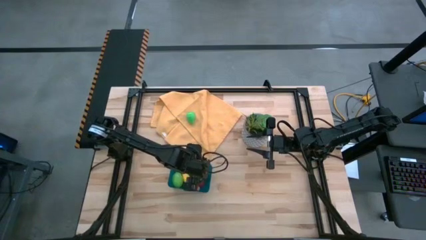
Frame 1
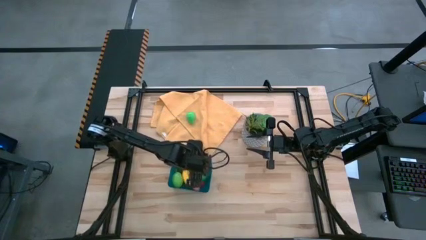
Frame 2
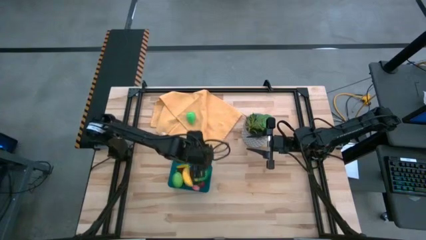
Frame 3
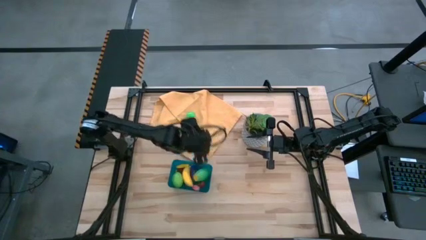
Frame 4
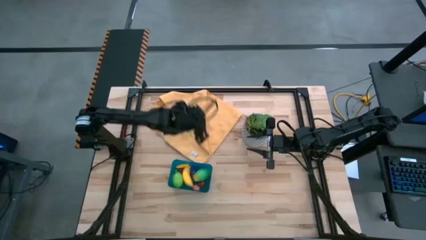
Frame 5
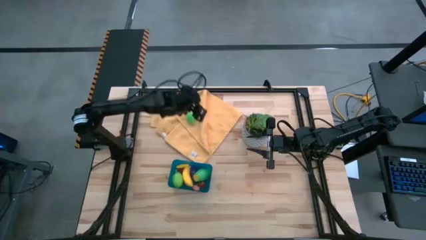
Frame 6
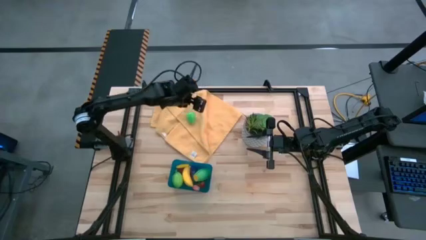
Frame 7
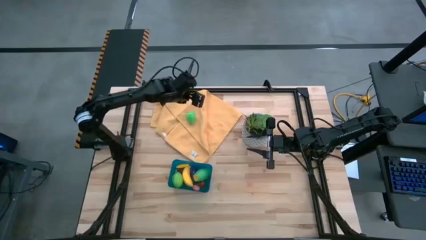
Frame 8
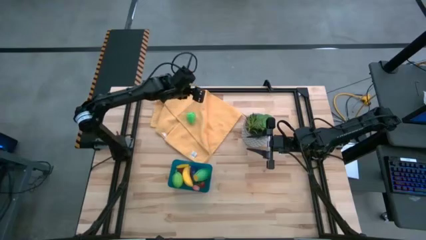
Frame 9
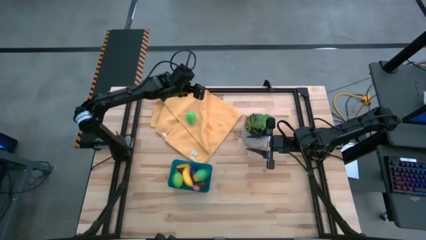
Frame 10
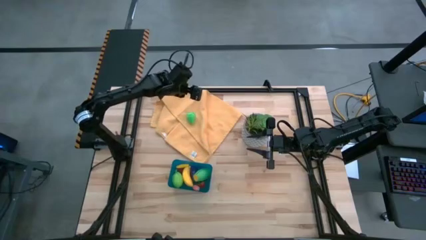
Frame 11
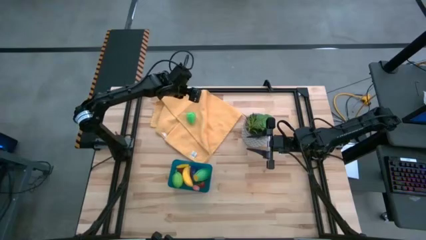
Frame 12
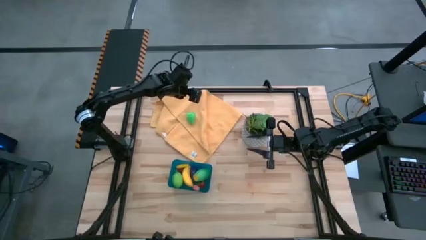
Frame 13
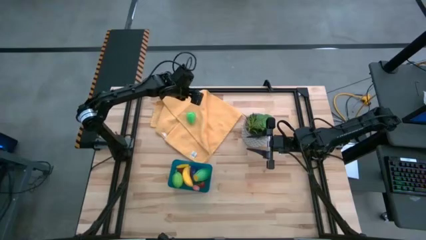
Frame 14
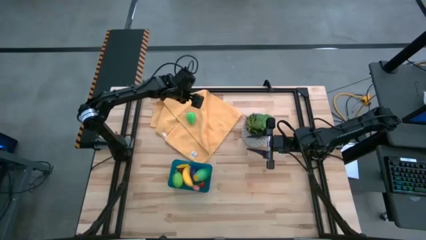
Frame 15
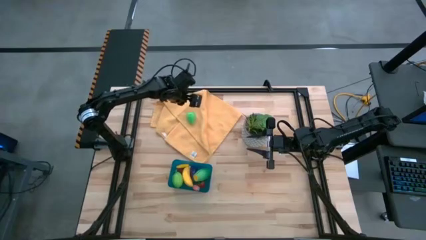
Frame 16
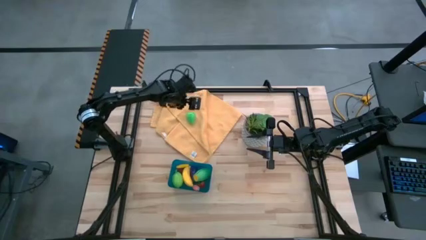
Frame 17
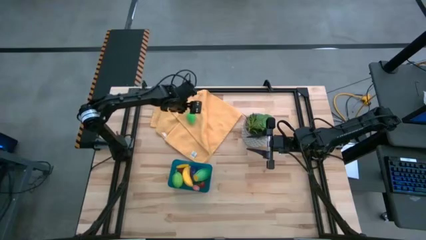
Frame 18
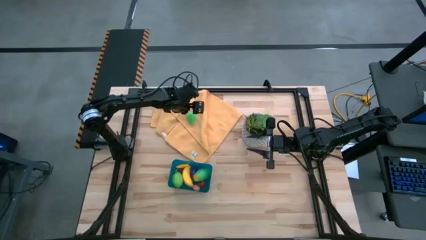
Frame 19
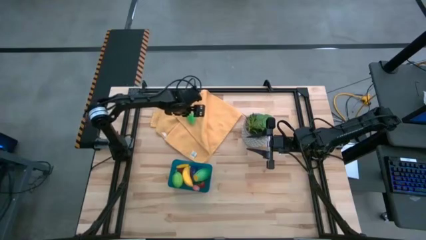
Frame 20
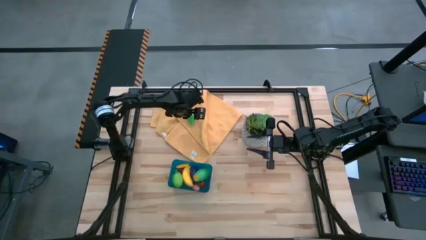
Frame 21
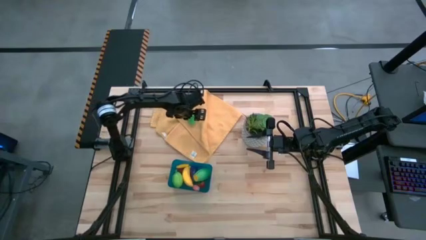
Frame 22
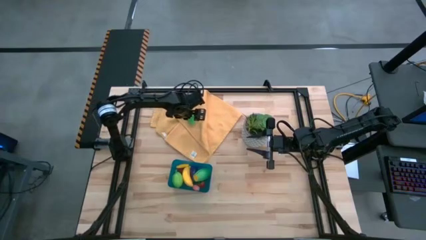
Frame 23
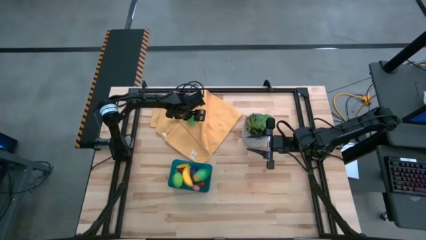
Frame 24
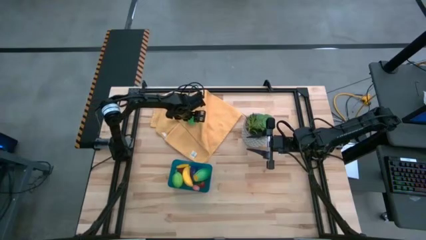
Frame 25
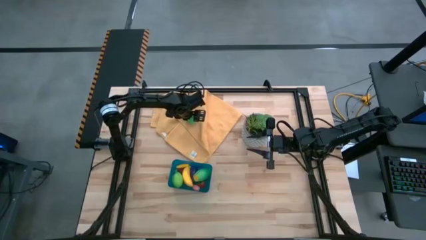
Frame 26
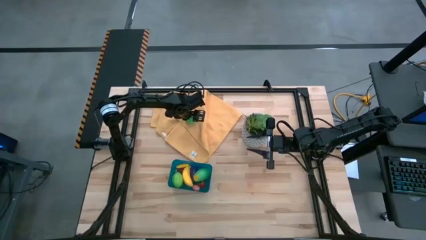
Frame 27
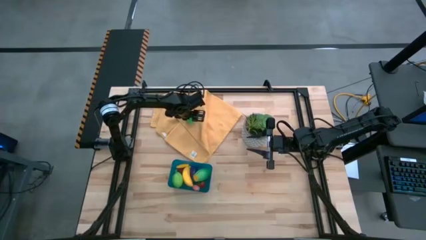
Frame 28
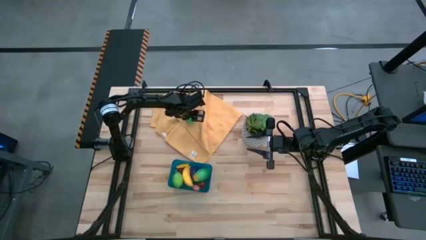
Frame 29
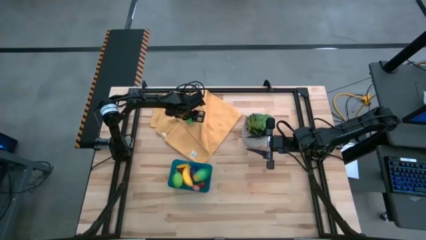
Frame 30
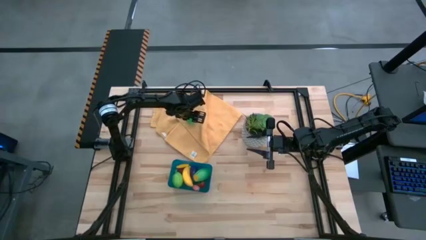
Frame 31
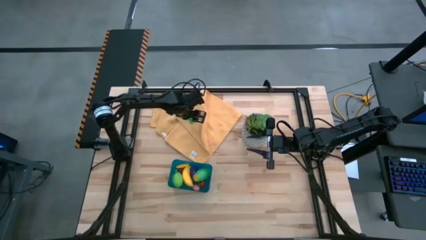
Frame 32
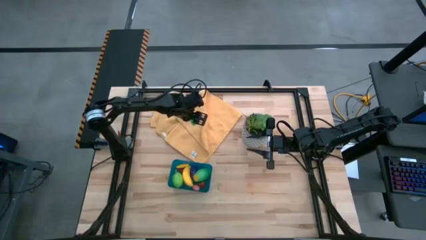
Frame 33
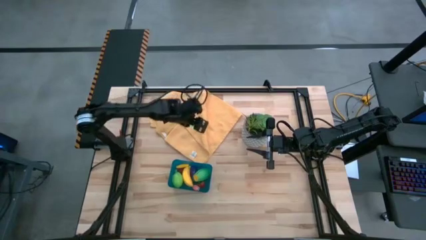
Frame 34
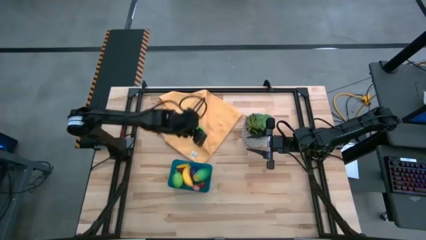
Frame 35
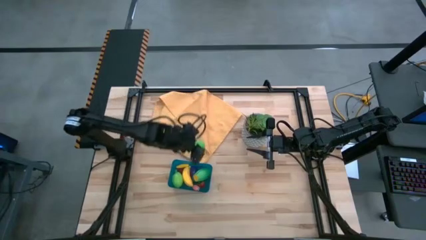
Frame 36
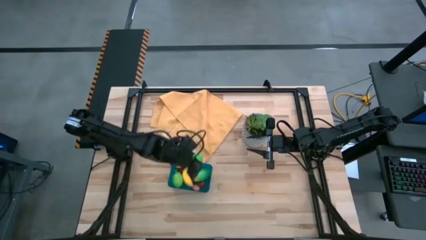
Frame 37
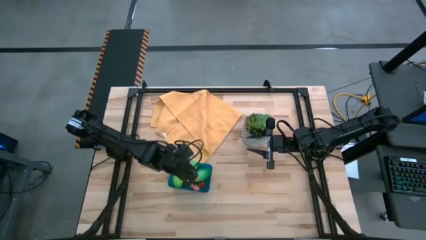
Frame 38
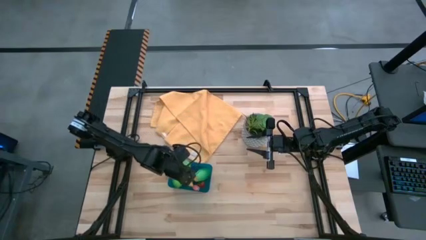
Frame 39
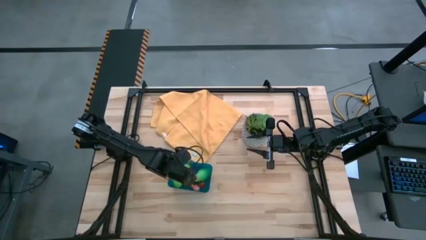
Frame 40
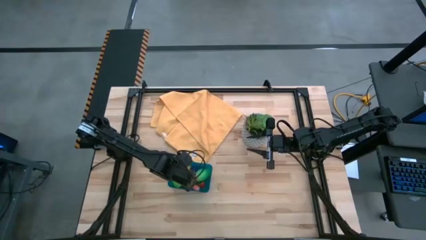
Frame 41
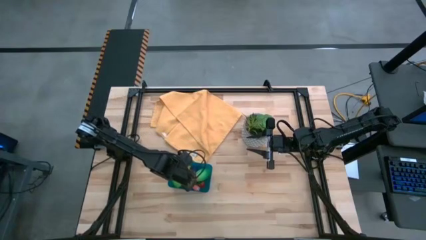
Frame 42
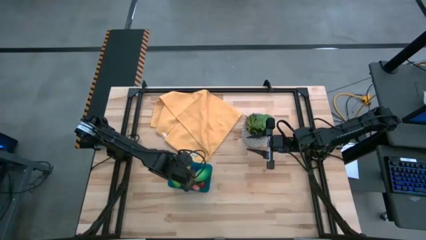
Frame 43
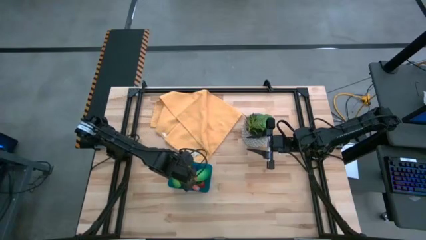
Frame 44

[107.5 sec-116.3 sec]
Task: Pick and placing Produce into tupperware
Put the pear into the blue bin

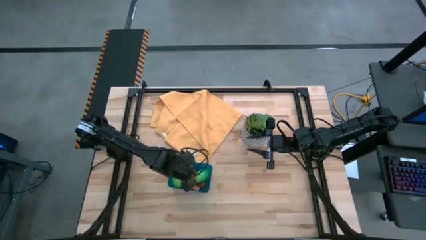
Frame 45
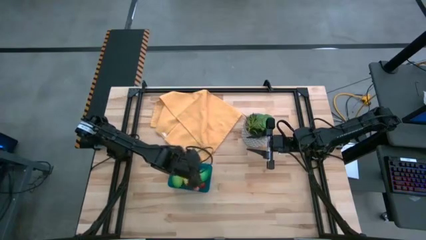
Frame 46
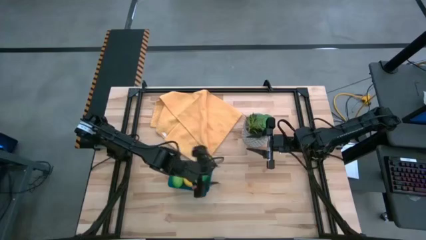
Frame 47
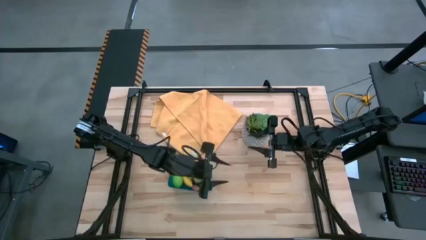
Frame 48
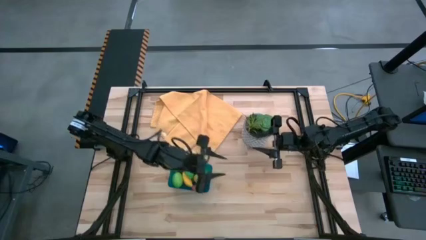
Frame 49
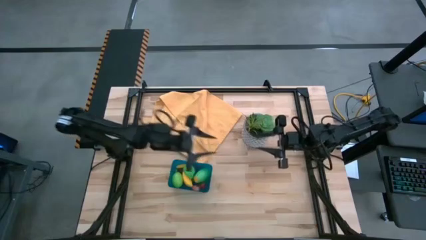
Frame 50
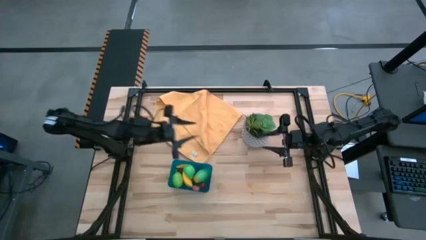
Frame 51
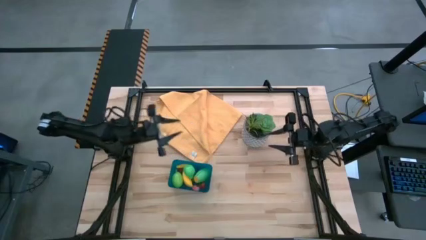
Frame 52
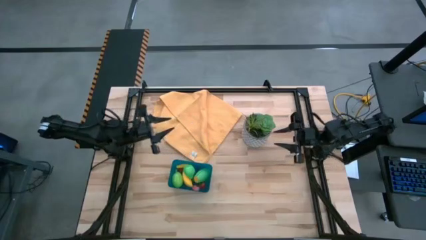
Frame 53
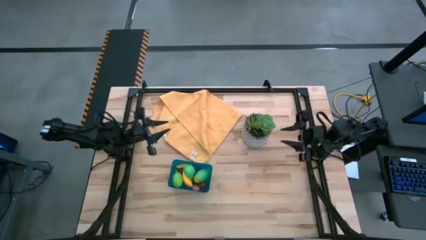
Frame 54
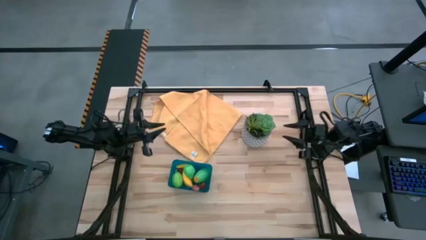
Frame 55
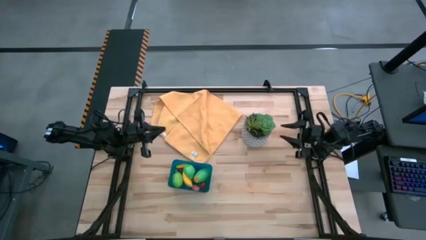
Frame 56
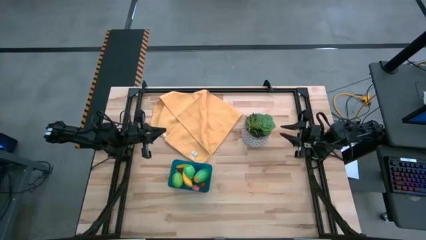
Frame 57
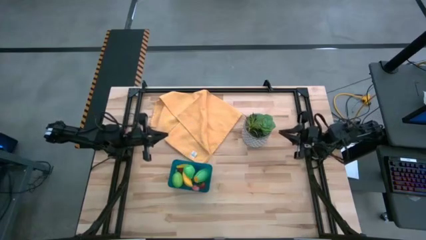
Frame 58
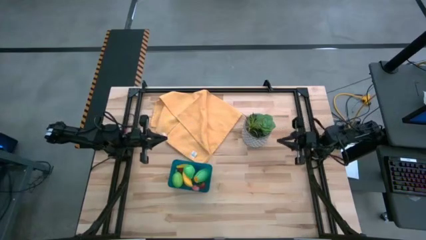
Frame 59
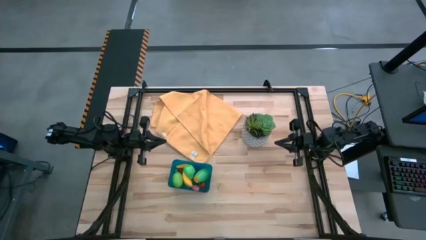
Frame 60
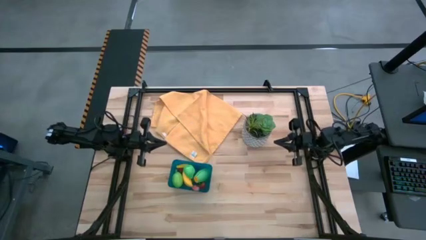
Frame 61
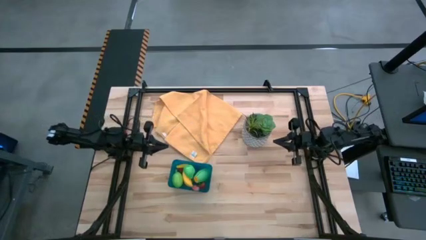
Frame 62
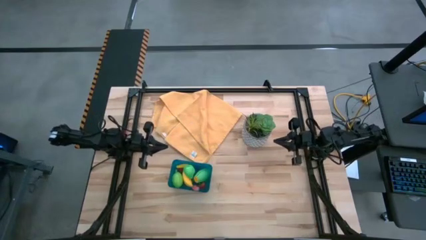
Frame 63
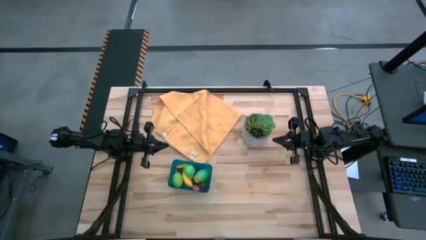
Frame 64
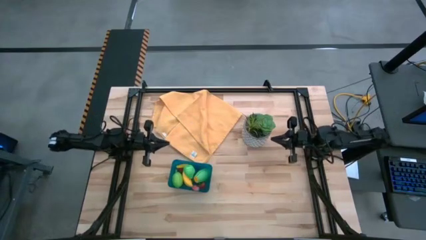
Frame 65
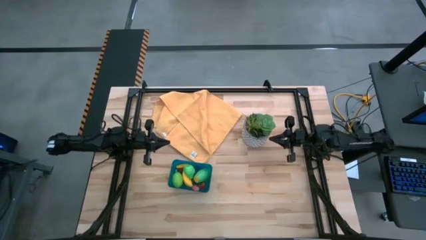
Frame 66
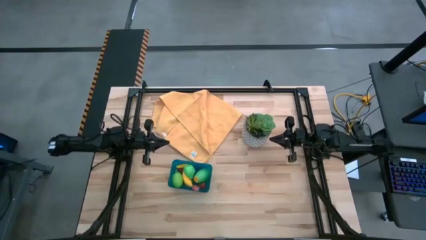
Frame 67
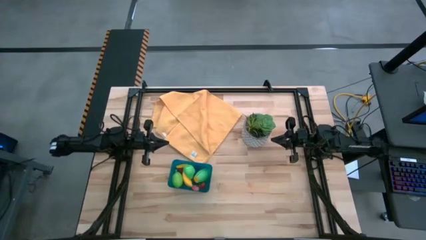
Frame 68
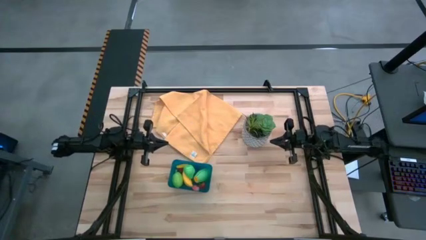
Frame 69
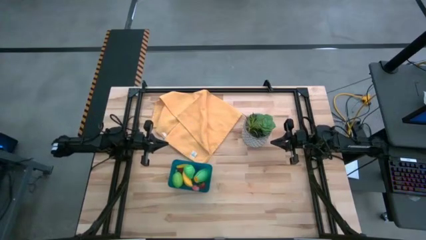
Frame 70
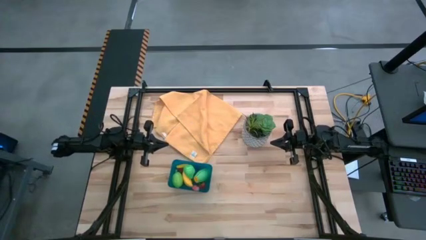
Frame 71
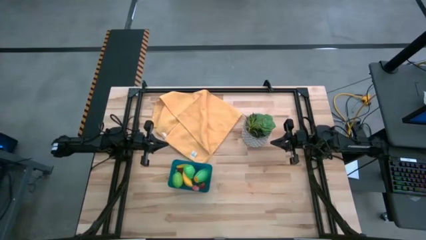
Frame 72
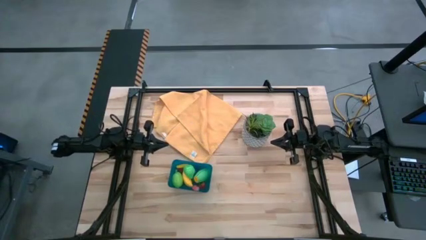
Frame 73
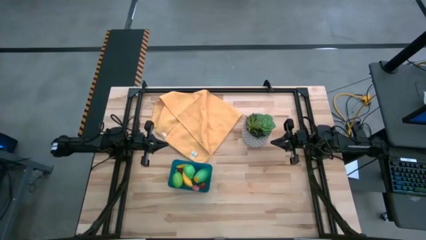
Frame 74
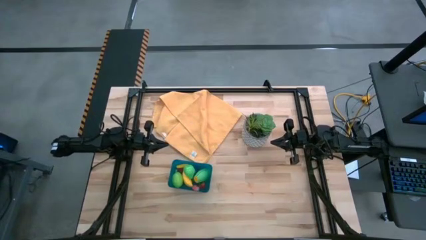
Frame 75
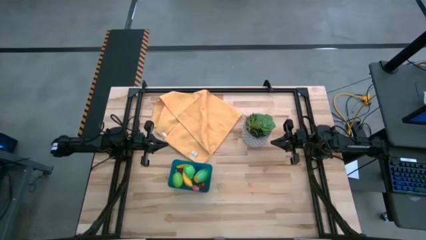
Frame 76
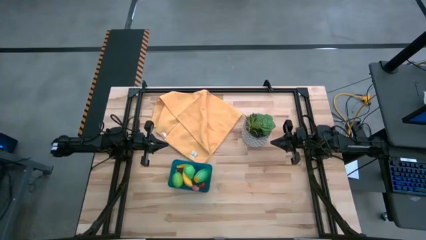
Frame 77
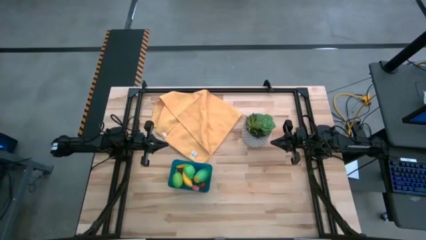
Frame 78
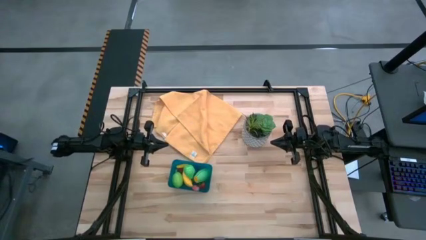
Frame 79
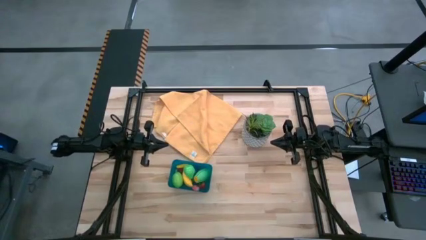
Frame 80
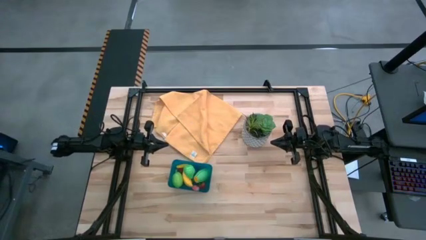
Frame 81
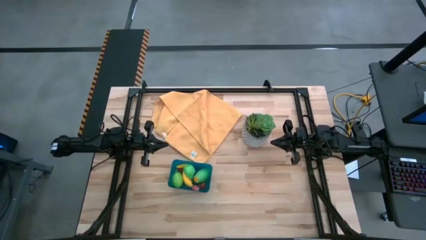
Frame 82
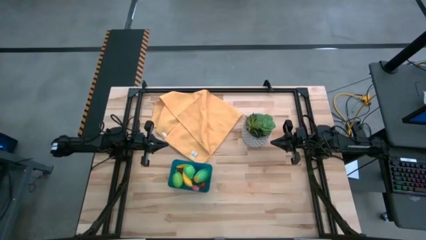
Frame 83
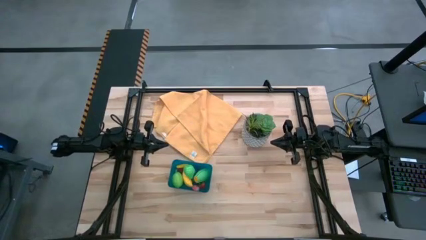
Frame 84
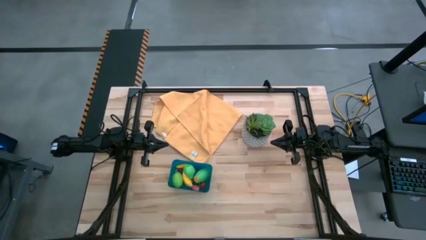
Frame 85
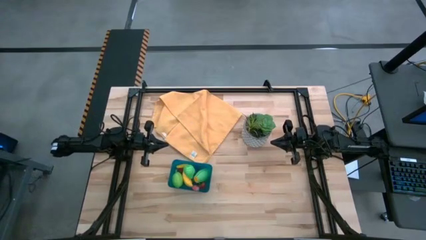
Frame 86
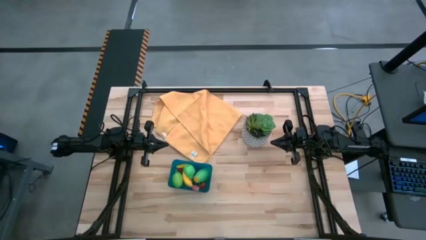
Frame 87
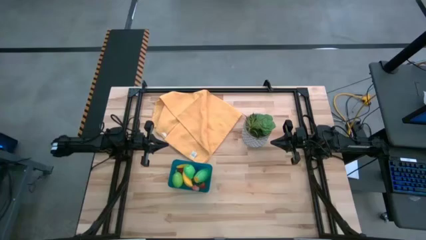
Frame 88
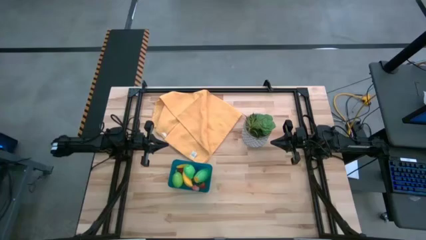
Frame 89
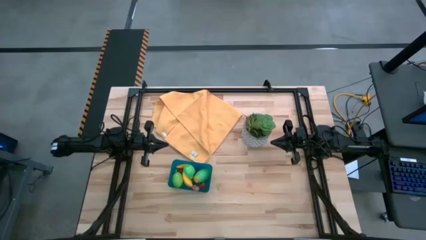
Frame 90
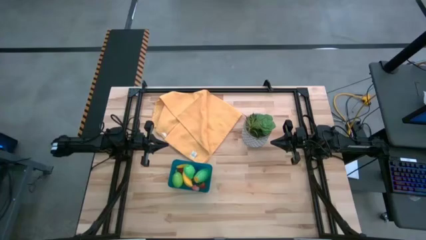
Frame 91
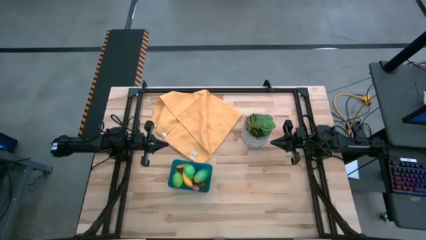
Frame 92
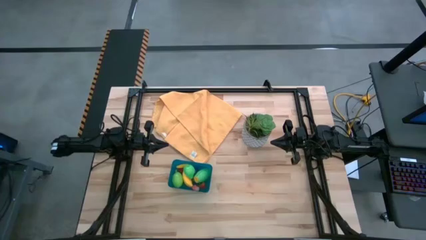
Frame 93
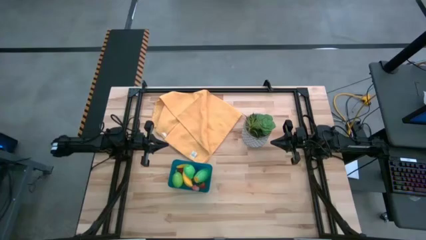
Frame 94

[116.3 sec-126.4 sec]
Return to Home Position
